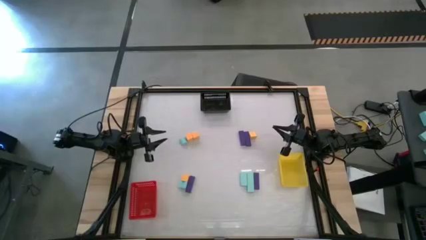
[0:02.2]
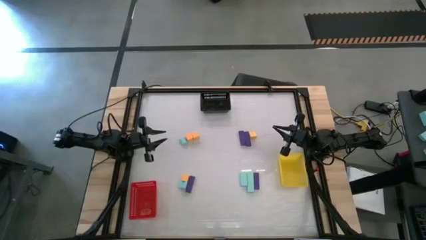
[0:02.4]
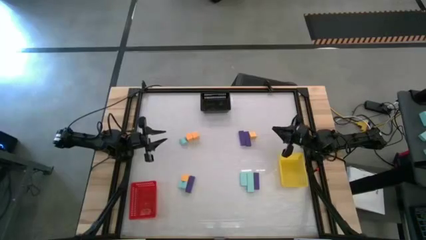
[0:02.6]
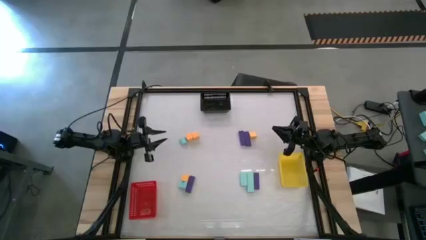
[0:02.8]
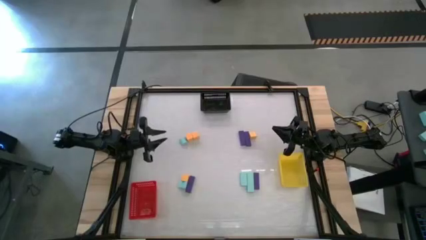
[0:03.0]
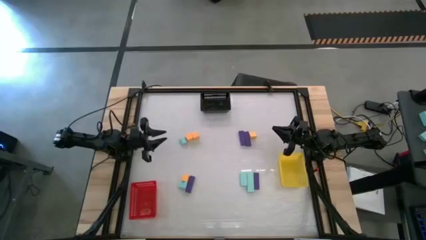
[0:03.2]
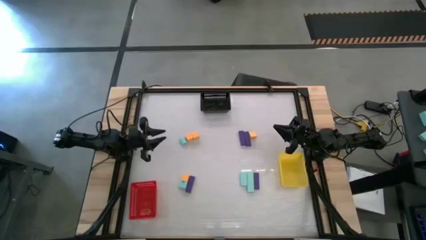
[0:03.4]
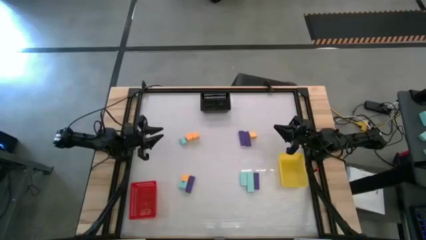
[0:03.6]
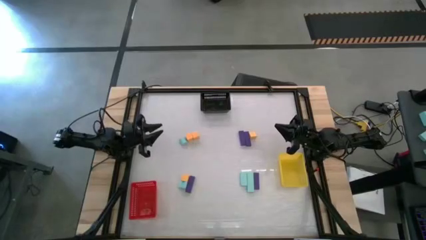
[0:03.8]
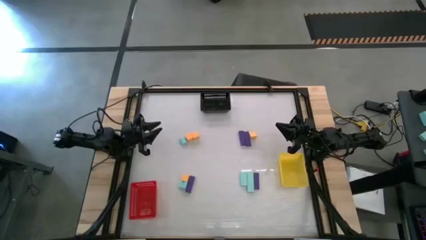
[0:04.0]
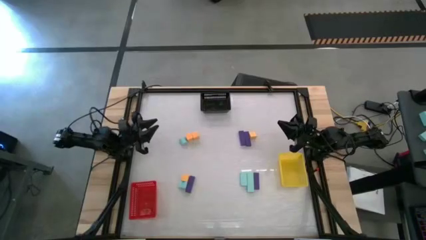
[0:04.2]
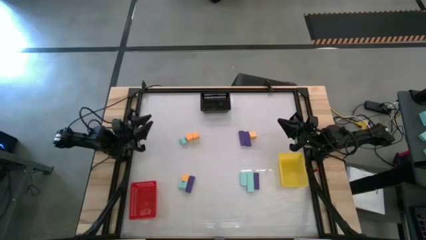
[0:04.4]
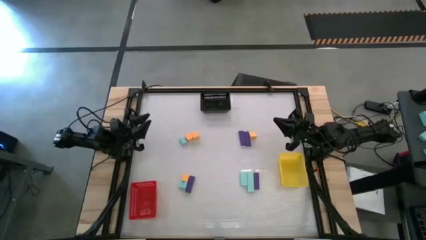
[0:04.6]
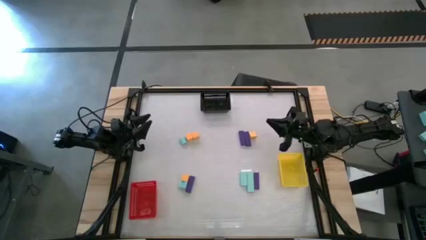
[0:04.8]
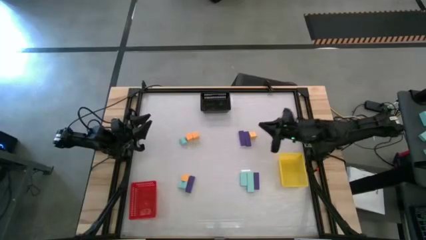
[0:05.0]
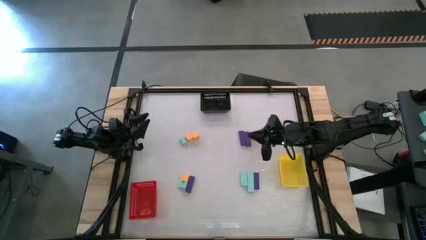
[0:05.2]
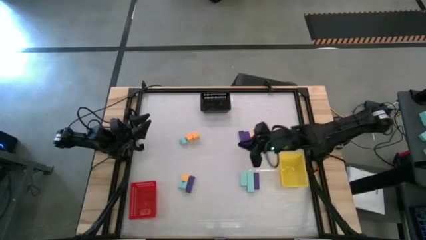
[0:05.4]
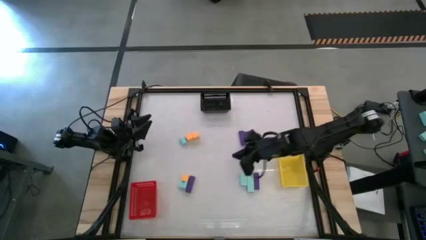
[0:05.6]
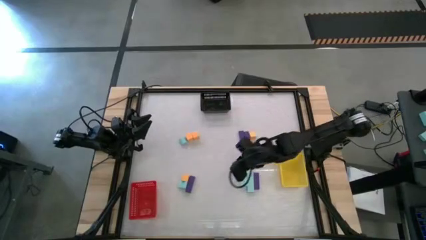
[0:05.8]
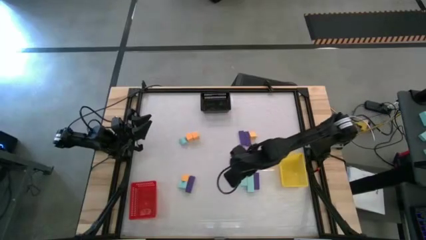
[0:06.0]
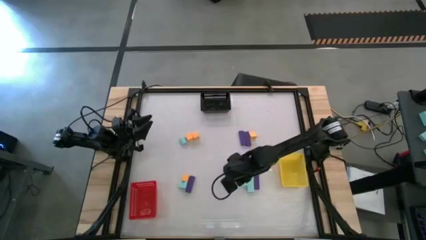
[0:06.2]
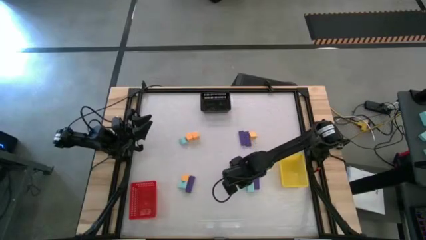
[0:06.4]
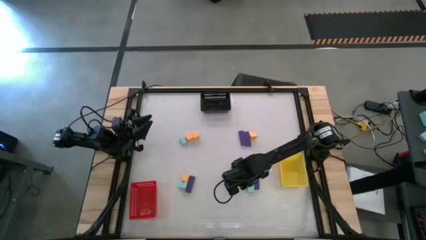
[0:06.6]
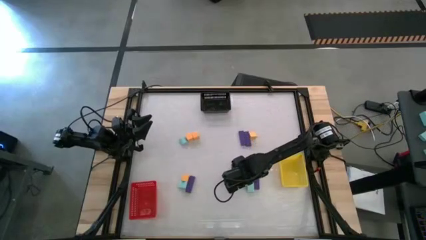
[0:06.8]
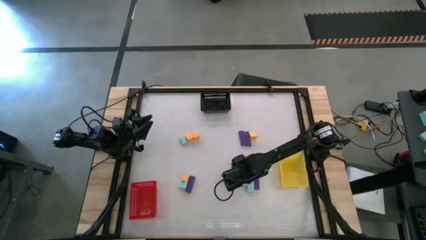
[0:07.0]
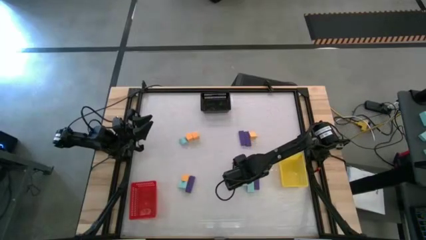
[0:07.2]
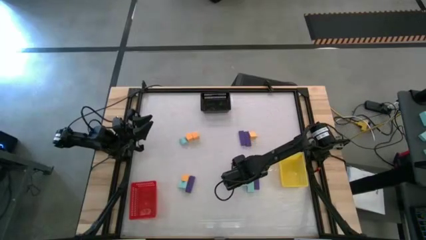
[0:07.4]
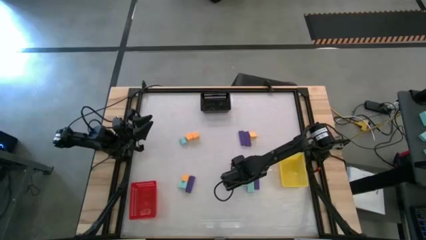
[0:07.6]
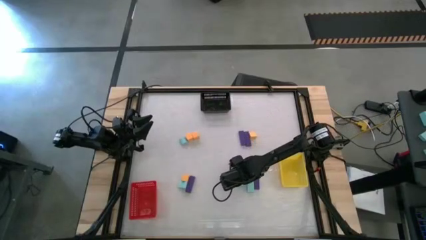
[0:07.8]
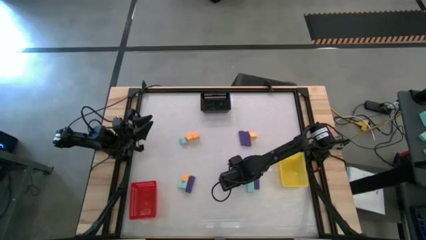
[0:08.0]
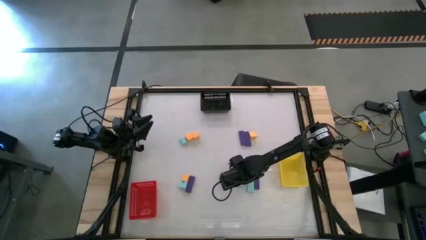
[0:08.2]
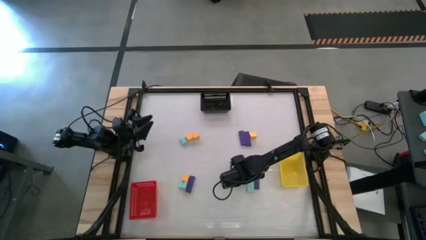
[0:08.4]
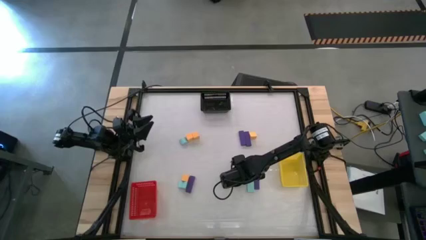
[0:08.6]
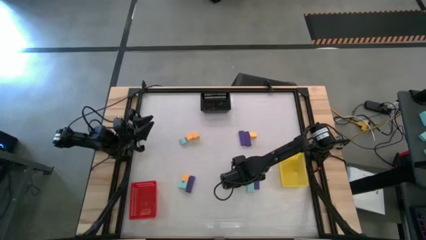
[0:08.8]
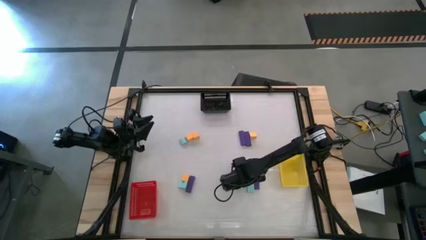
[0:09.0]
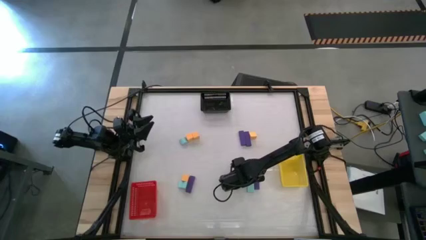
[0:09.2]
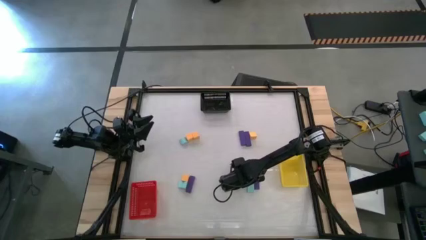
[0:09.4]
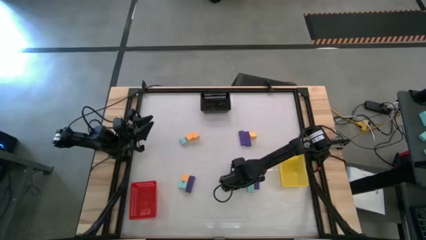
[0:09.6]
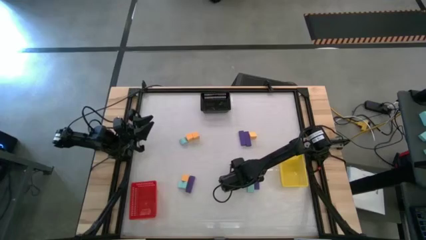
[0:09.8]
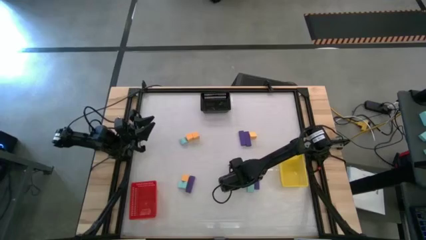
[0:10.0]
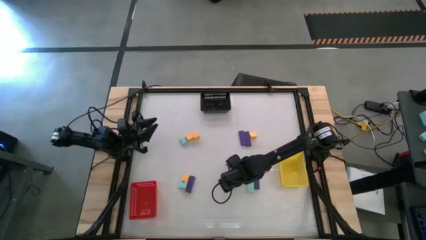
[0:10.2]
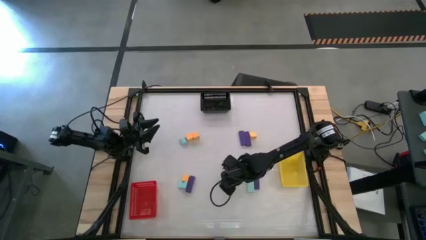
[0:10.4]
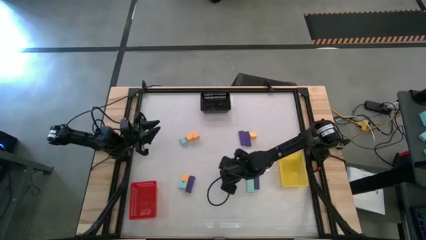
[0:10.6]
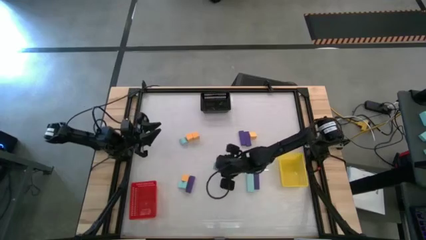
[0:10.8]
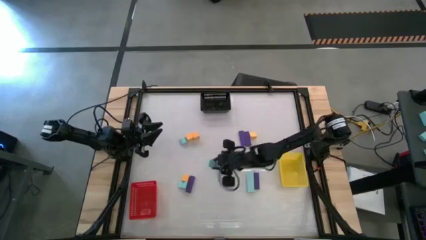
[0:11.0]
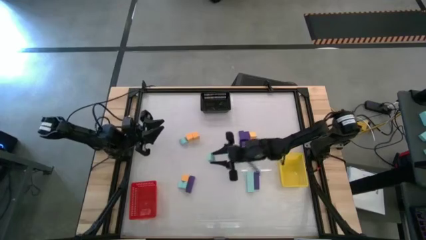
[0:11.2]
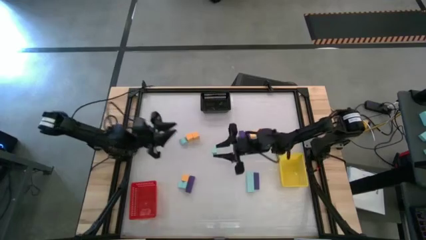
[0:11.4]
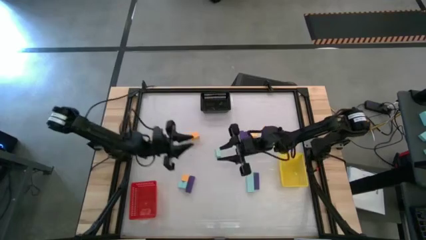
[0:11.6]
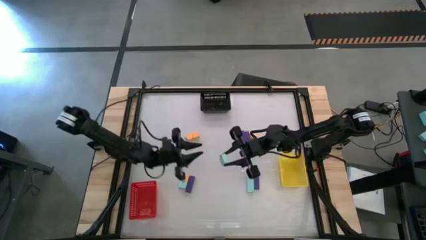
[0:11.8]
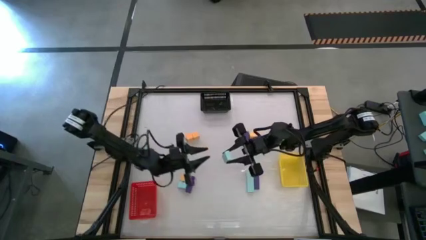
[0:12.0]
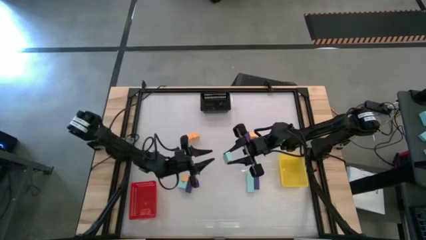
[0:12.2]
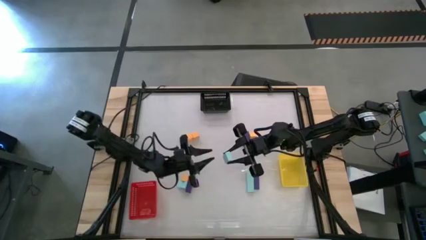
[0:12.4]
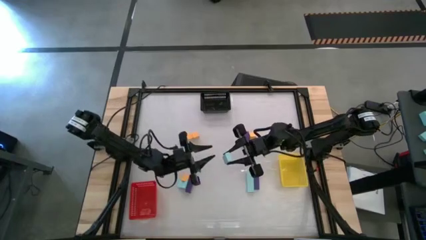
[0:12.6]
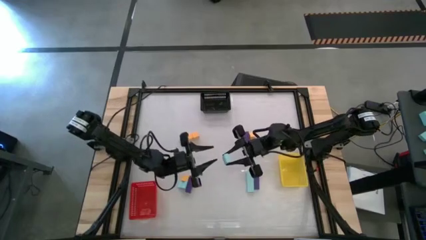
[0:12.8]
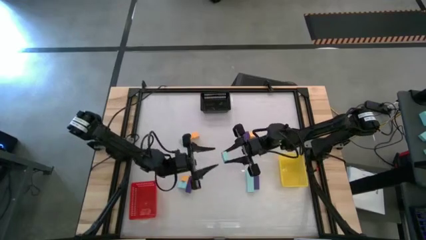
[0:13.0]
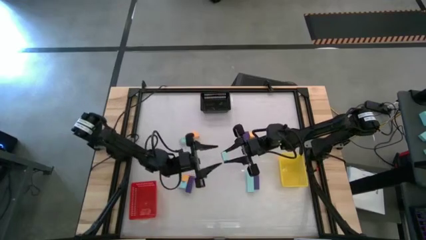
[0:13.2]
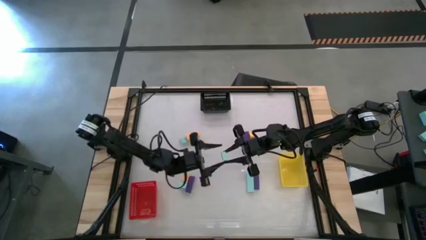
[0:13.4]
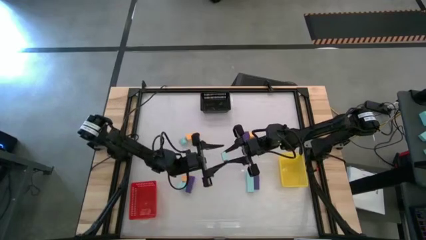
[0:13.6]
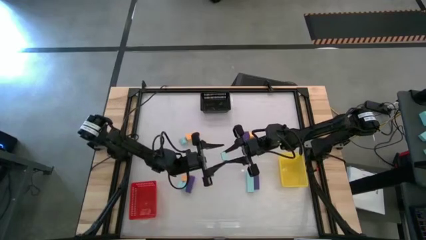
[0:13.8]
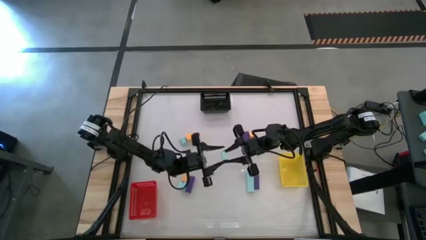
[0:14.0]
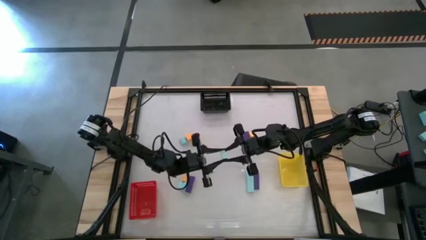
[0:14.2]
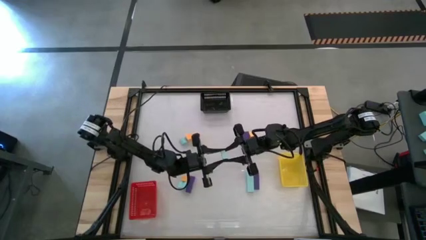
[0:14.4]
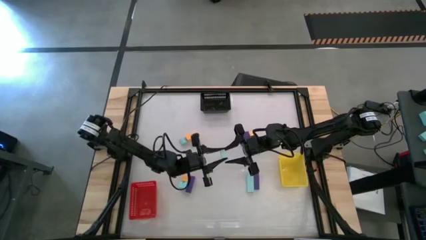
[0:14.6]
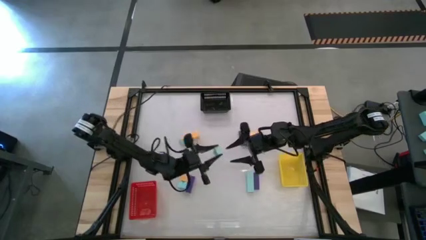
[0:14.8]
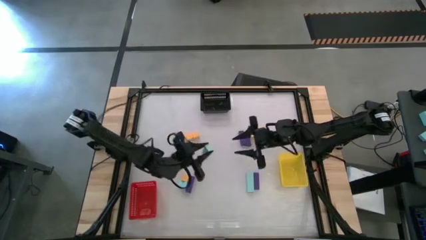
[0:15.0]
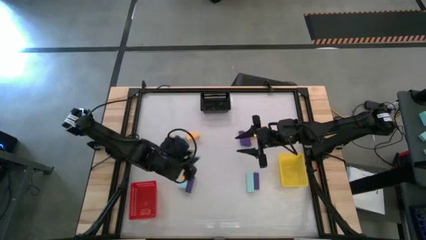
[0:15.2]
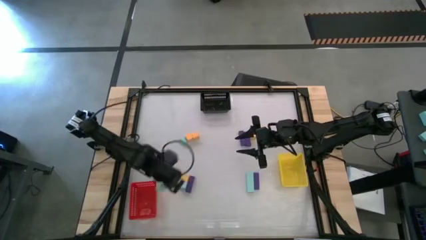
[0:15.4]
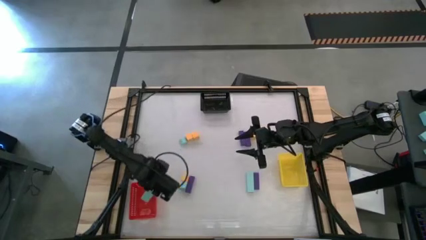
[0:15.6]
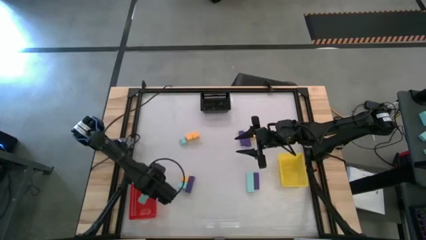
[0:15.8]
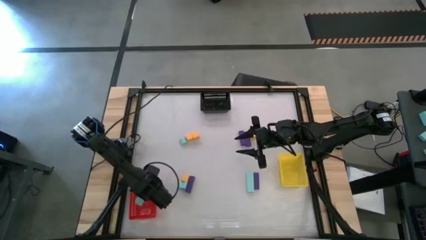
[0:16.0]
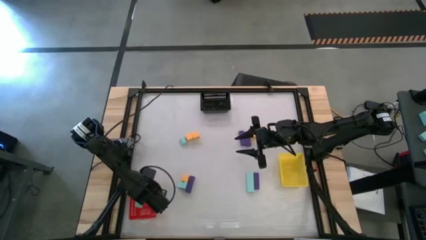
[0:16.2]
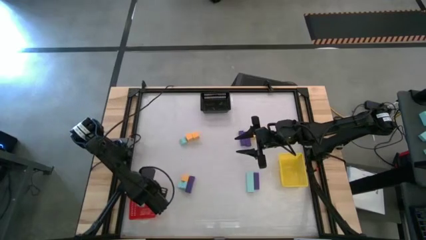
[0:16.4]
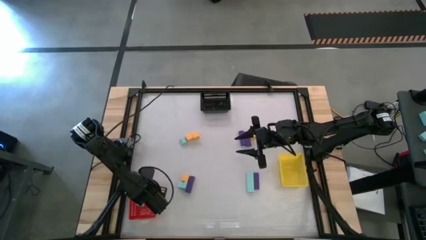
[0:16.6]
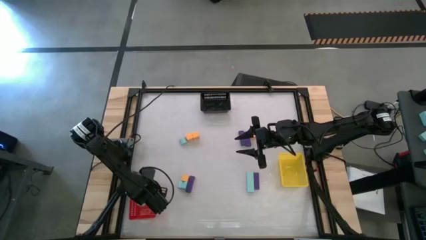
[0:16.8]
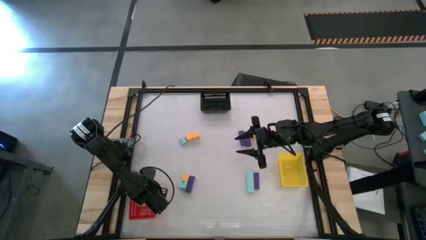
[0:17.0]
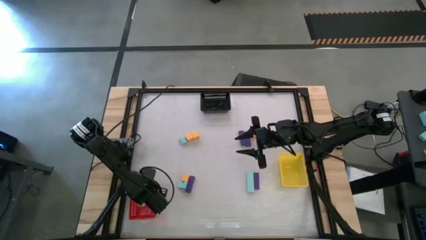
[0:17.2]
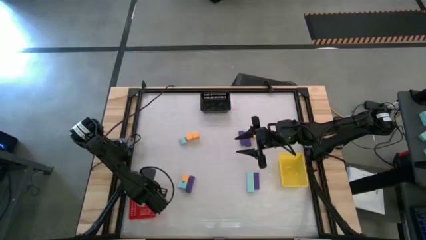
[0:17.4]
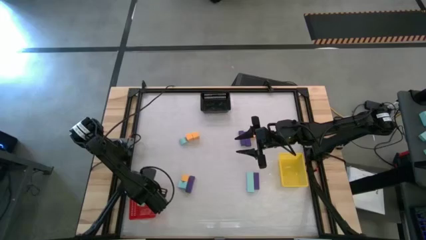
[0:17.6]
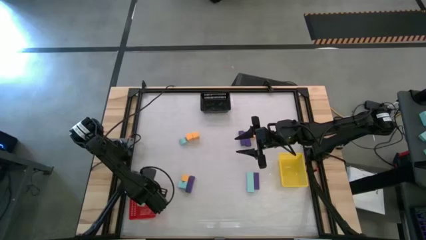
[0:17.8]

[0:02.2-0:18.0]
Task: Sort & place blocks by color
Put the blue block into the red bin
